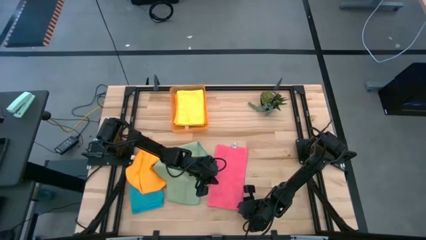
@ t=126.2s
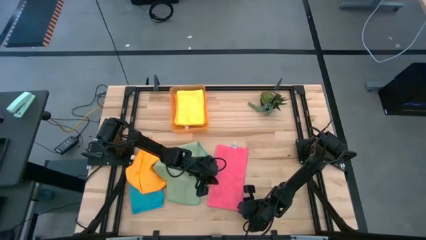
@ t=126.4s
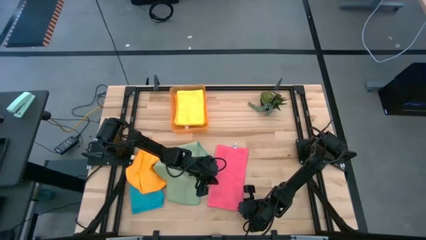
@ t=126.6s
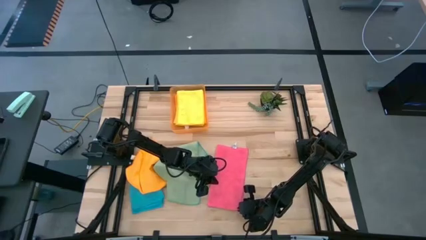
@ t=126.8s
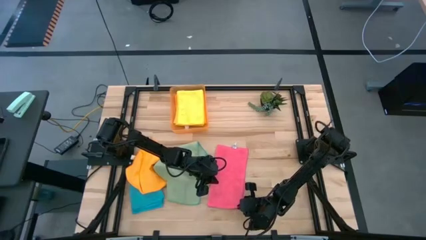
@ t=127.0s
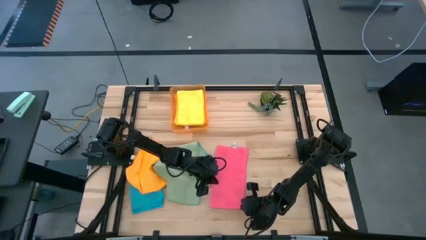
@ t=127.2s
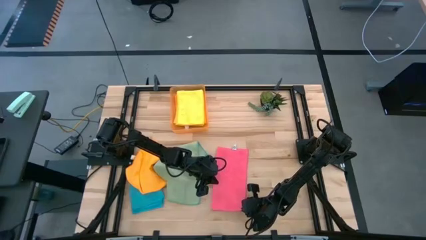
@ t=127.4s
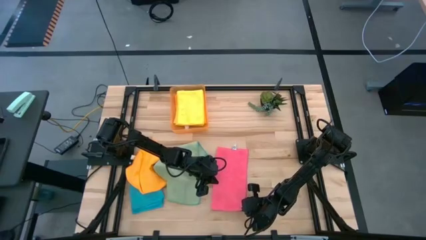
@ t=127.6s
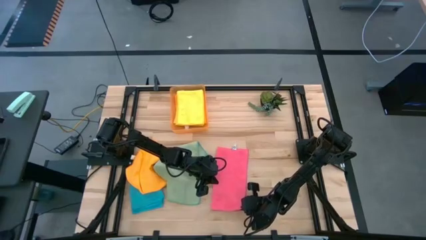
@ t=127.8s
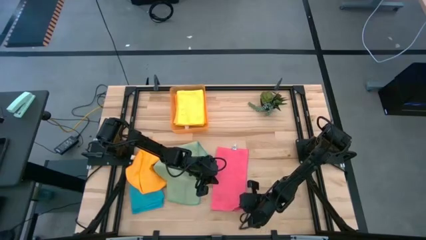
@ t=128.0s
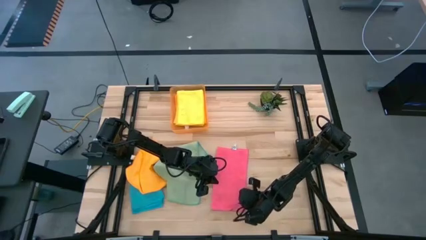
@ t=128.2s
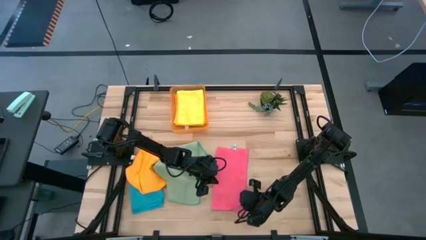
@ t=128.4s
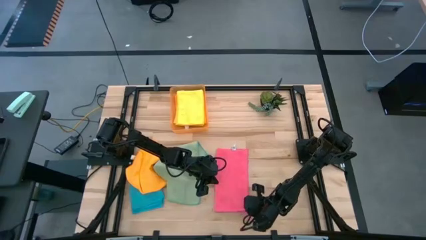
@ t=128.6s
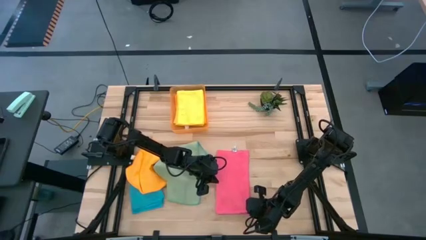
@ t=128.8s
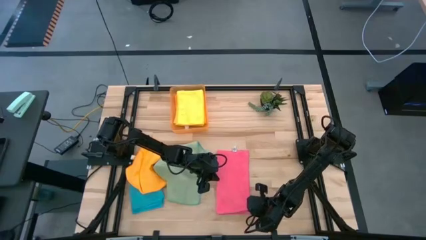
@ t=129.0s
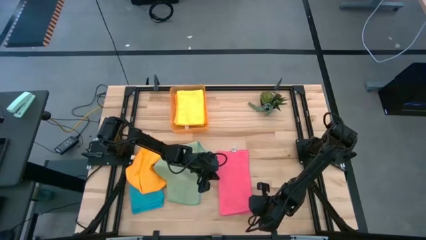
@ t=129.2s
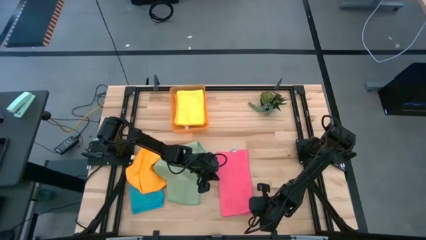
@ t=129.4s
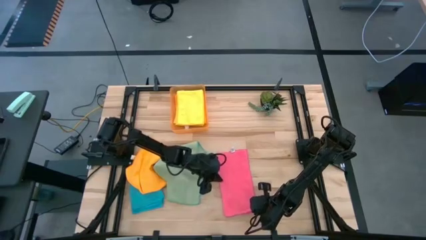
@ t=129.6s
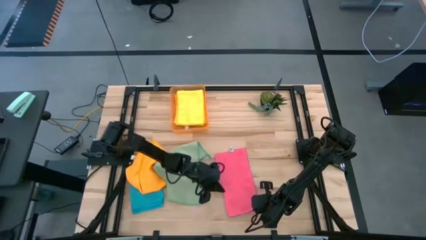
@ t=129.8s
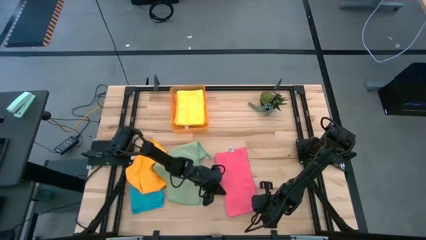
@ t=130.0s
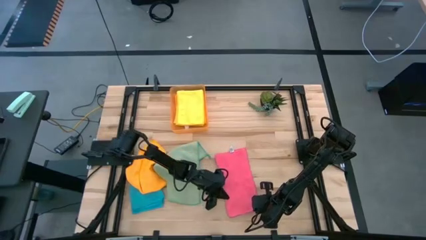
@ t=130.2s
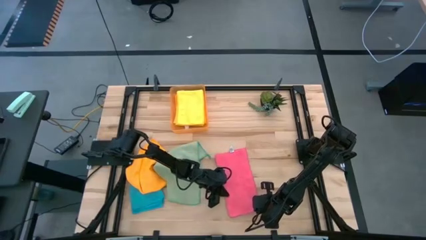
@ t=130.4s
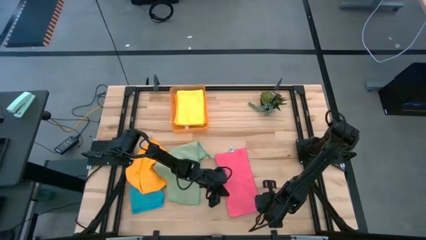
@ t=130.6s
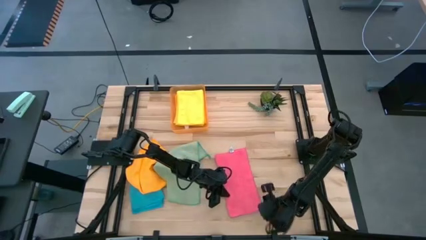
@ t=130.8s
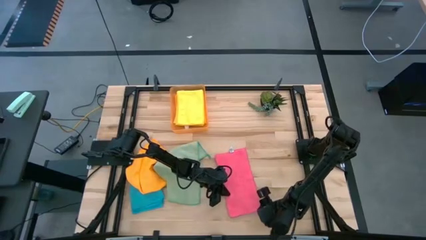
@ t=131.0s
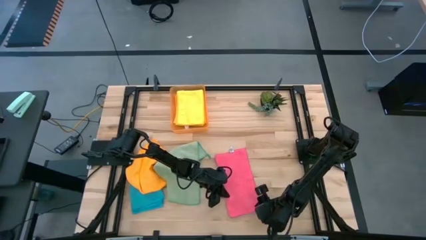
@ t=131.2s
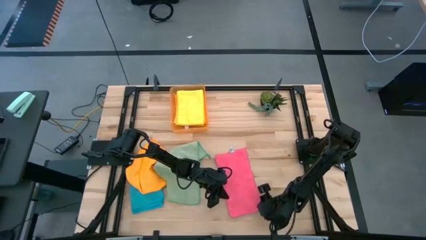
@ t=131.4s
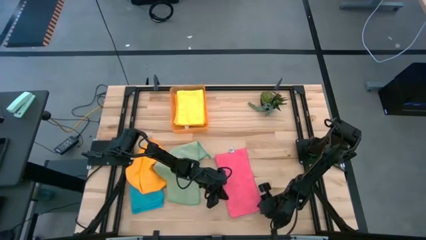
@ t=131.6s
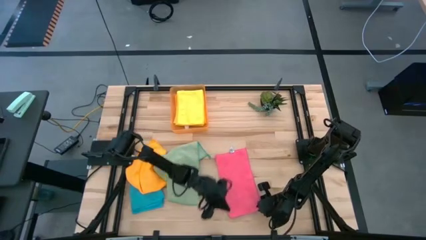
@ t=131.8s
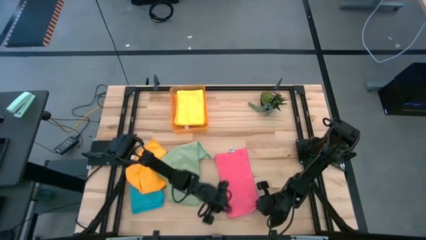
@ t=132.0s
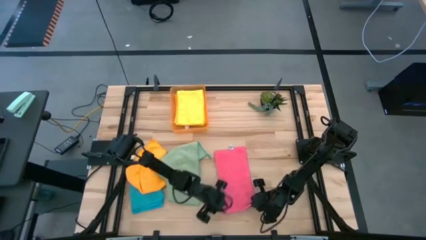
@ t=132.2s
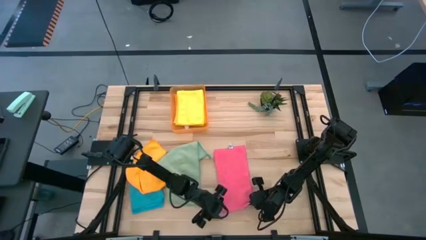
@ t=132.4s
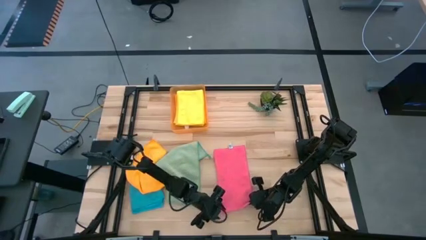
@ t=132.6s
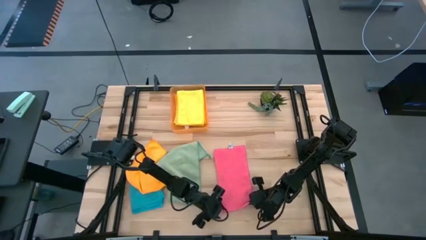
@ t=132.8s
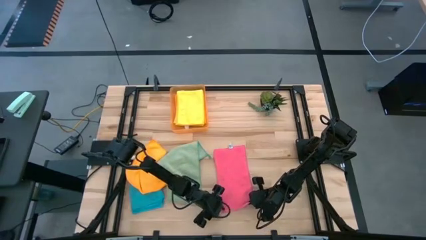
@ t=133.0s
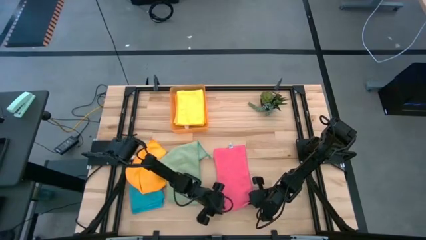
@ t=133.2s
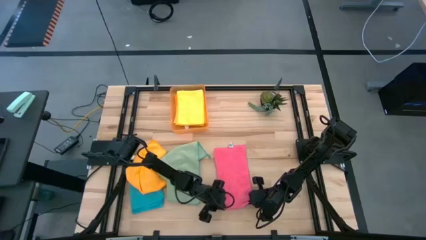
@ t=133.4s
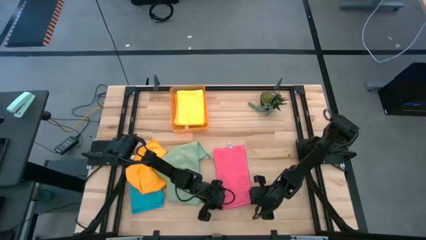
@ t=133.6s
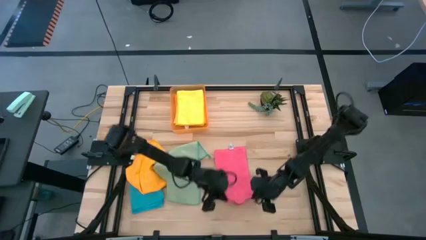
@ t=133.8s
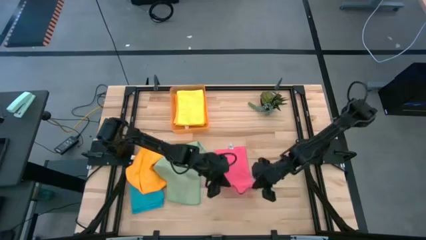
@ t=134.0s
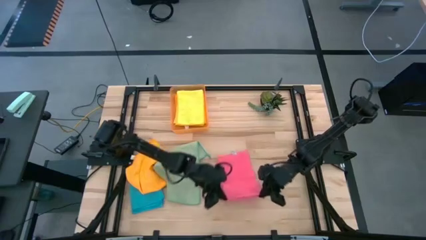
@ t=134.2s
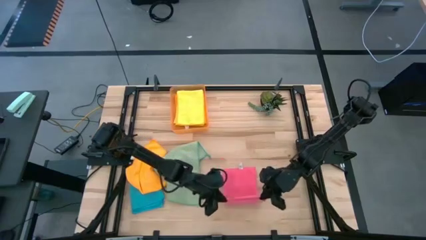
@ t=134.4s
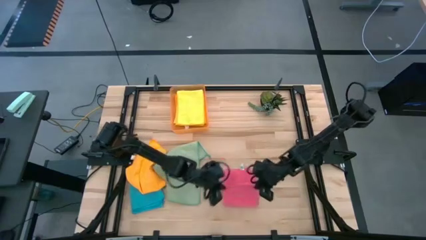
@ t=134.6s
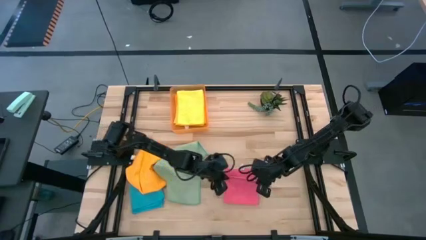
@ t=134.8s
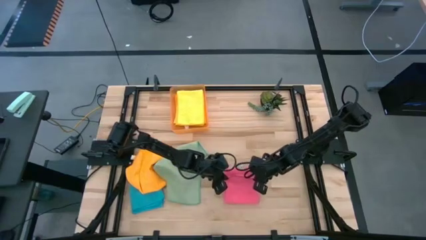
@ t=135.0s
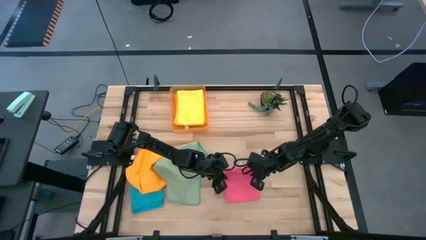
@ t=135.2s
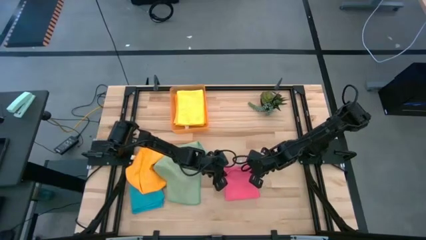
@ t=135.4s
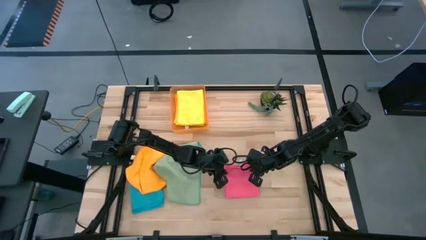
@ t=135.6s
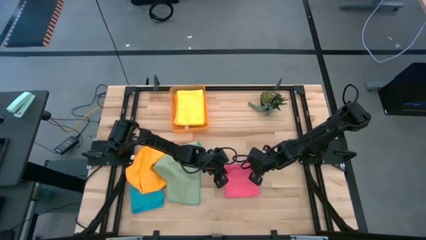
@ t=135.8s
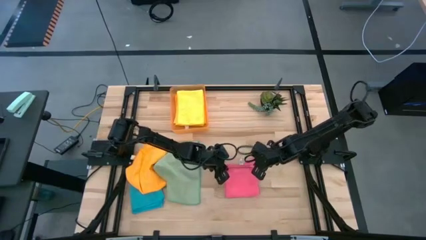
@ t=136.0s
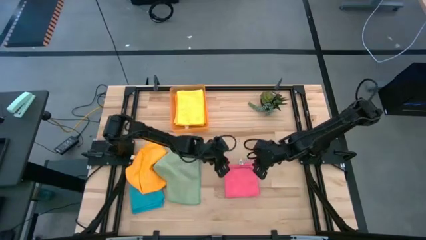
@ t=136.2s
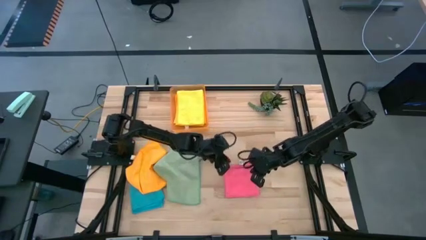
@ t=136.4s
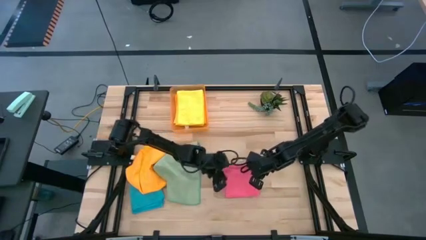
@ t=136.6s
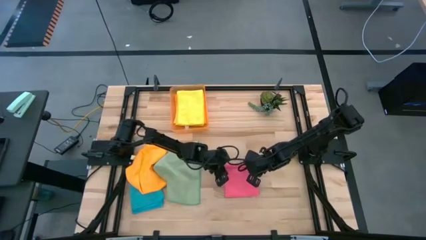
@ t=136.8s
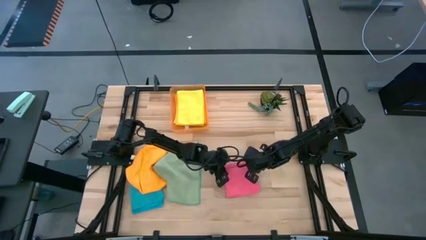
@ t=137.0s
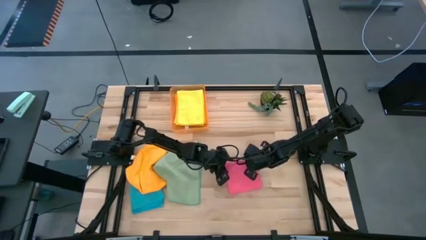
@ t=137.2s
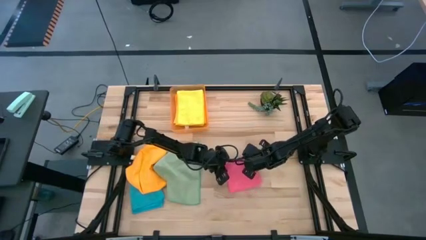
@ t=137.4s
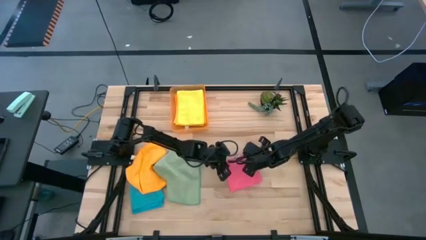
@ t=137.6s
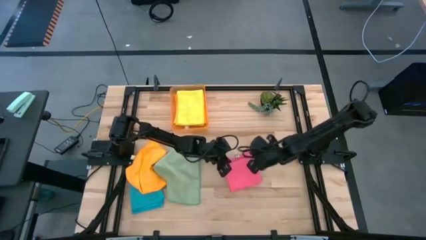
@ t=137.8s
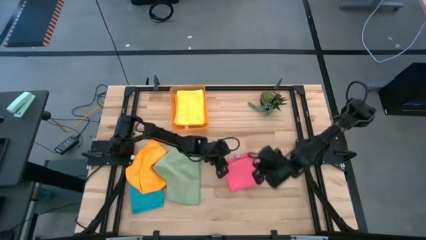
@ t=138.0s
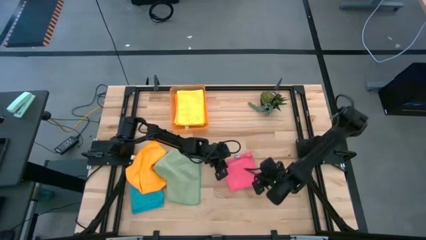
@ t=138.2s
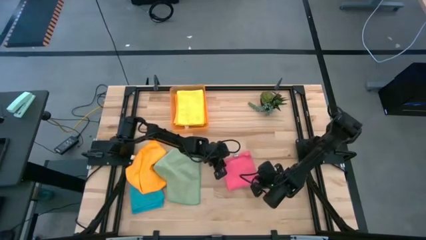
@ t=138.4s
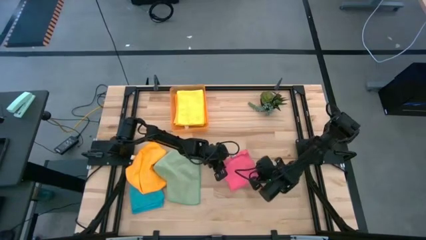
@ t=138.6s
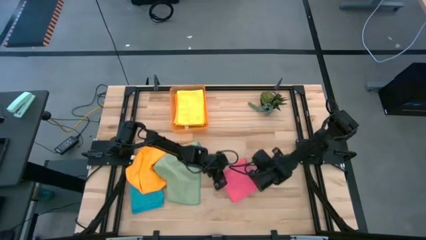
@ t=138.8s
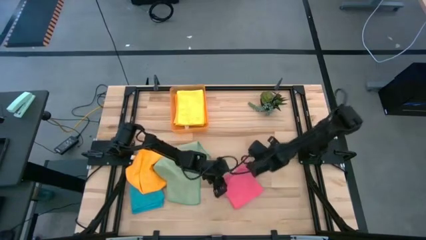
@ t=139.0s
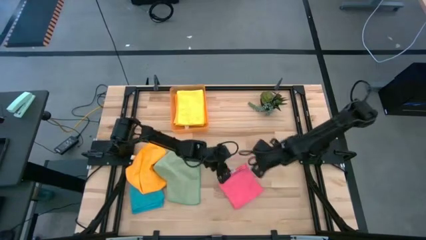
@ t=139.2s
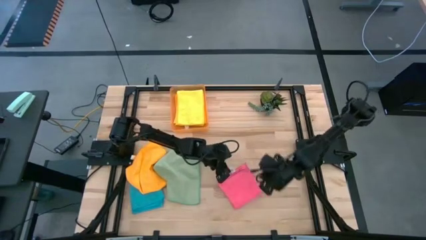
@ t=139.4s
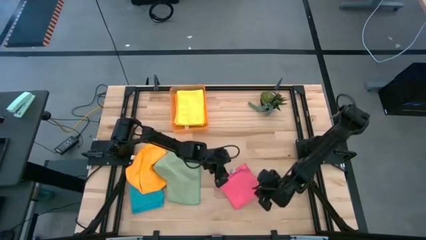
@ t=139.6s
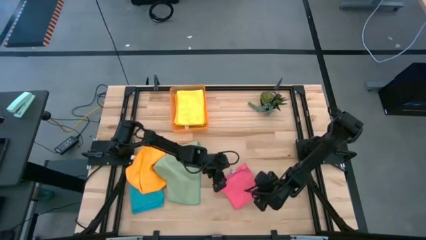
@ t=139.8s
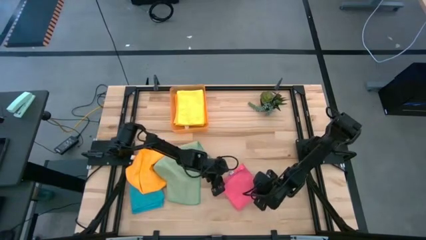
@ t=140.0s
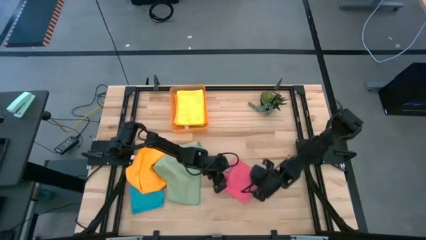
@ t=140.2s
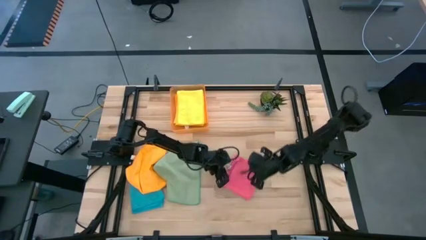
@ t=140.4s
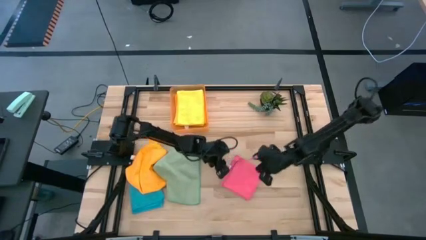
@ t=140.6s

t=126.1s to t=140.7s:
Task: Fold microfiber towels
Fold the pink microfiber cloth
